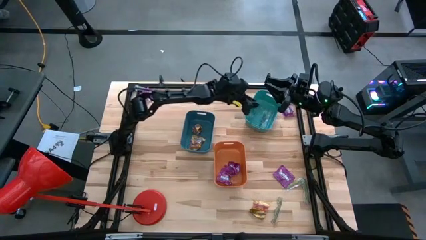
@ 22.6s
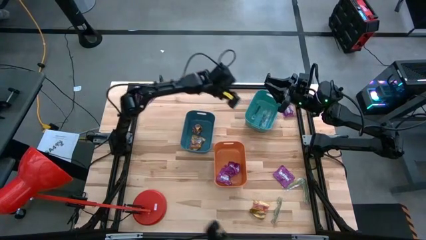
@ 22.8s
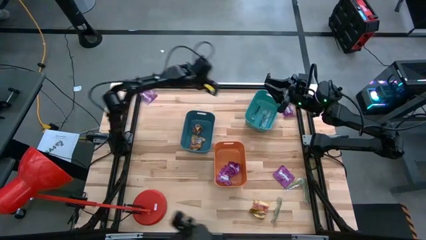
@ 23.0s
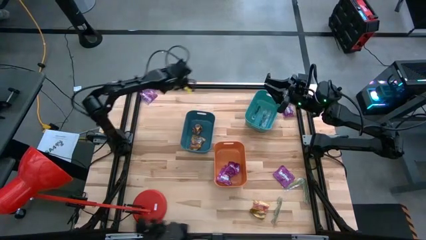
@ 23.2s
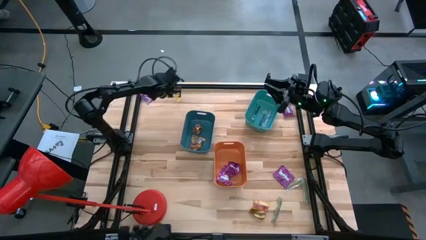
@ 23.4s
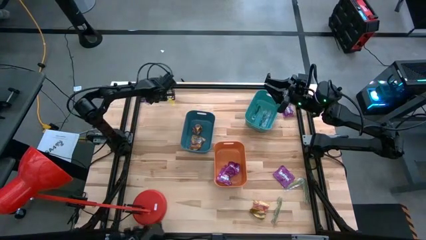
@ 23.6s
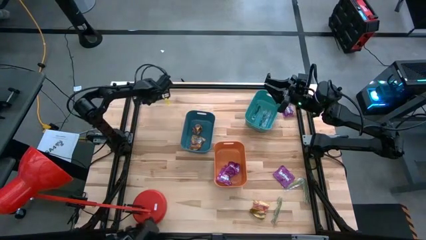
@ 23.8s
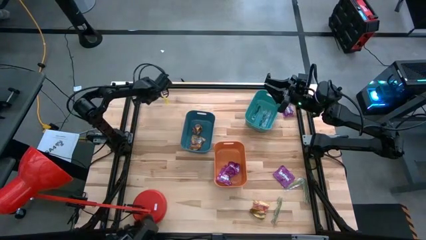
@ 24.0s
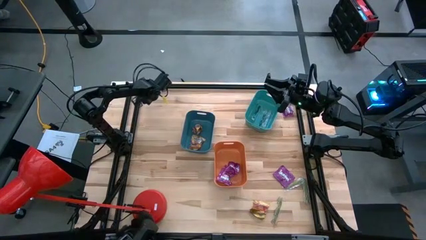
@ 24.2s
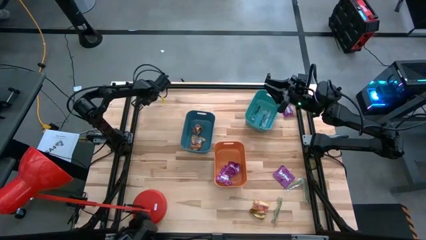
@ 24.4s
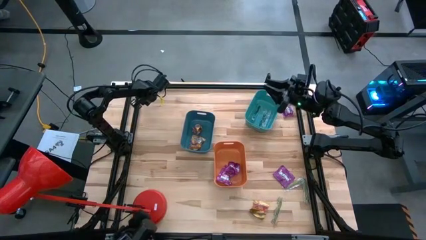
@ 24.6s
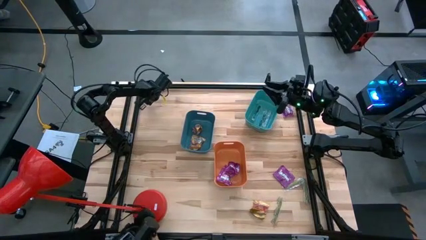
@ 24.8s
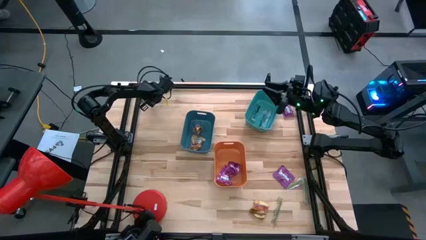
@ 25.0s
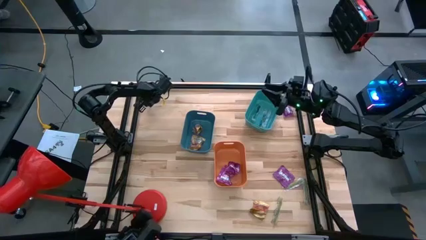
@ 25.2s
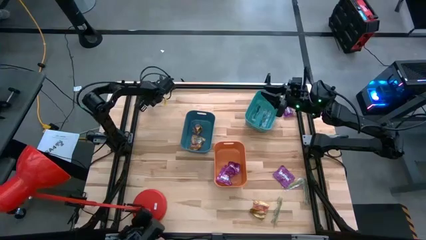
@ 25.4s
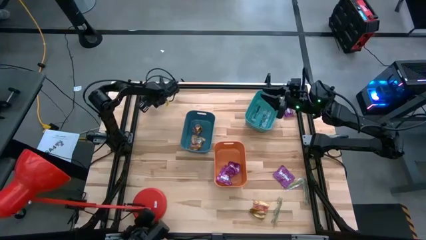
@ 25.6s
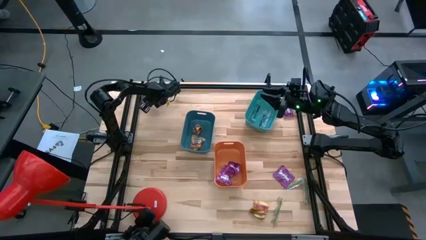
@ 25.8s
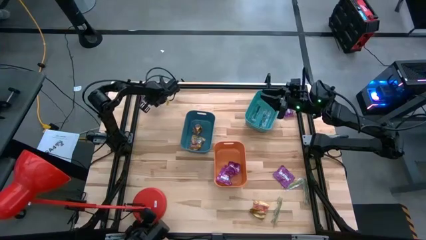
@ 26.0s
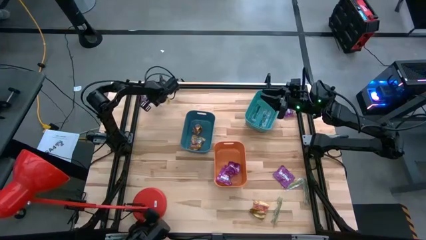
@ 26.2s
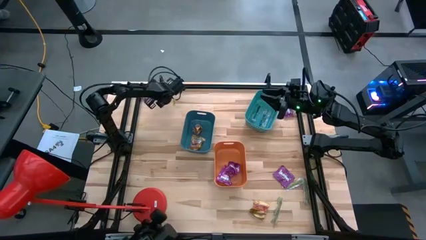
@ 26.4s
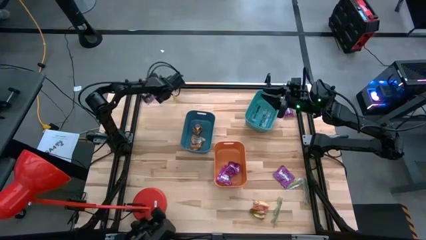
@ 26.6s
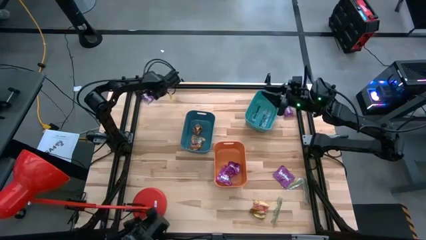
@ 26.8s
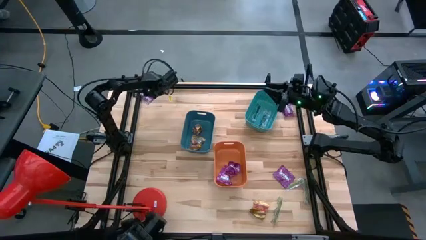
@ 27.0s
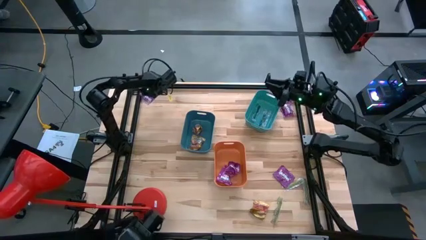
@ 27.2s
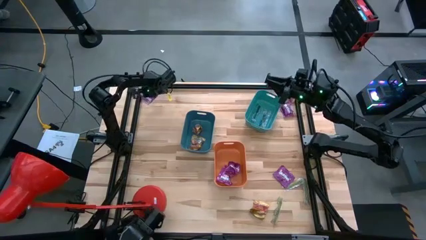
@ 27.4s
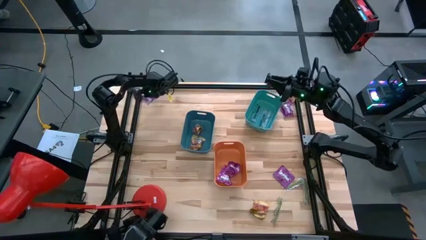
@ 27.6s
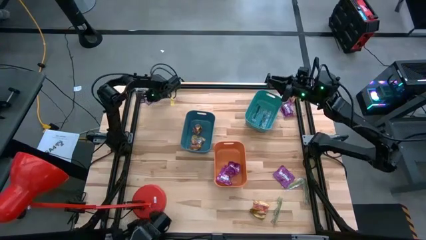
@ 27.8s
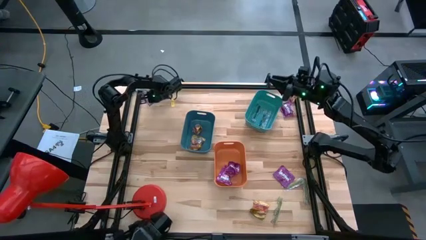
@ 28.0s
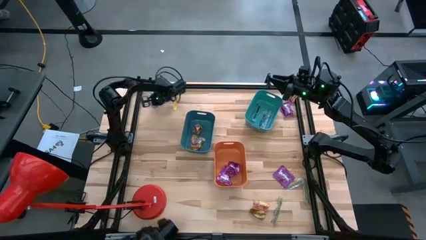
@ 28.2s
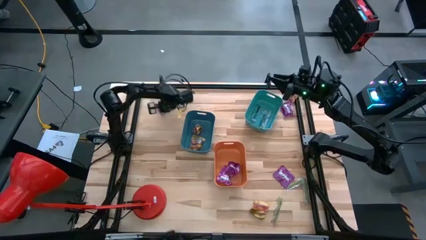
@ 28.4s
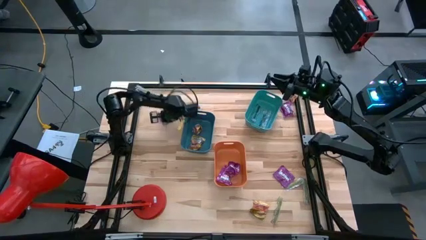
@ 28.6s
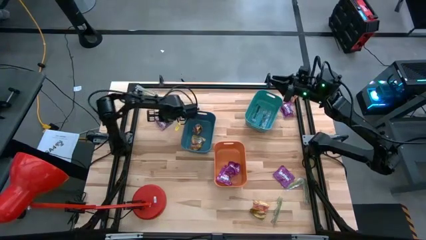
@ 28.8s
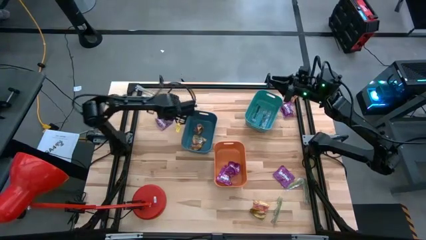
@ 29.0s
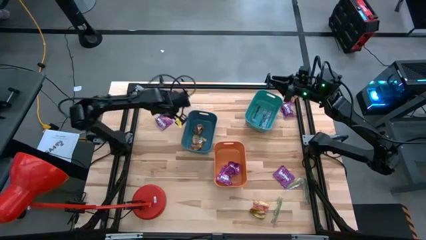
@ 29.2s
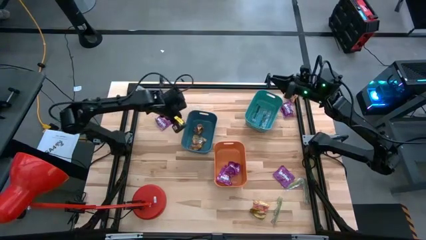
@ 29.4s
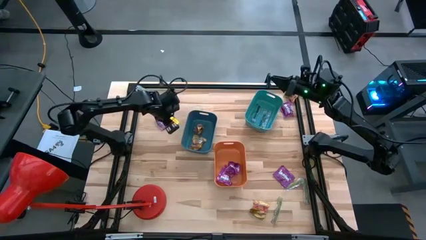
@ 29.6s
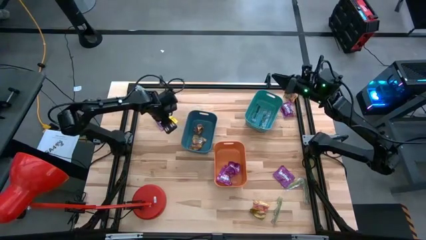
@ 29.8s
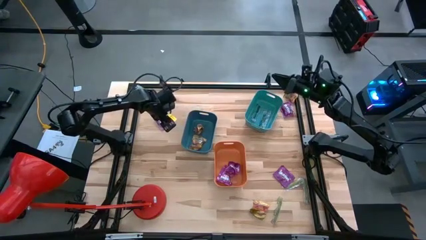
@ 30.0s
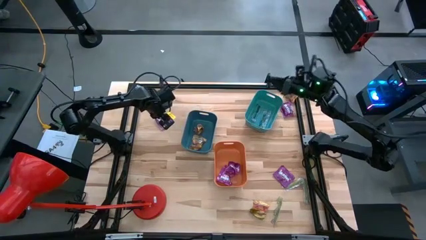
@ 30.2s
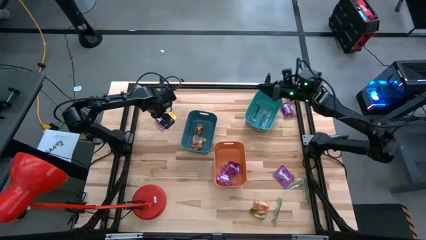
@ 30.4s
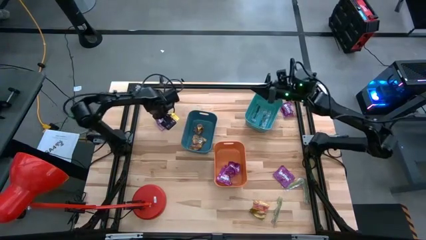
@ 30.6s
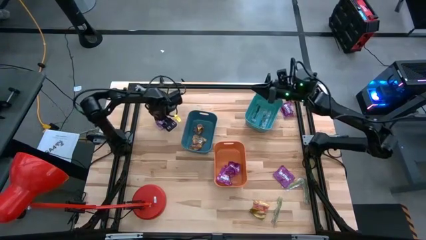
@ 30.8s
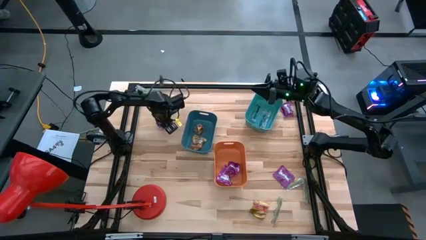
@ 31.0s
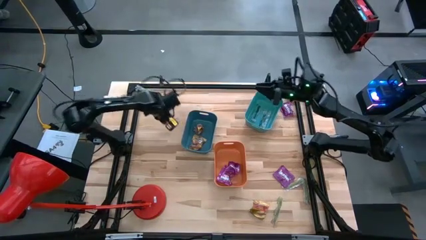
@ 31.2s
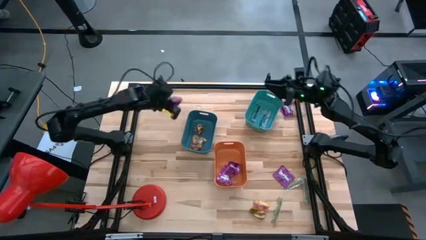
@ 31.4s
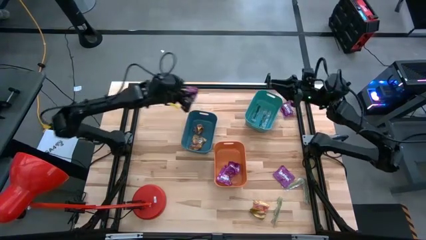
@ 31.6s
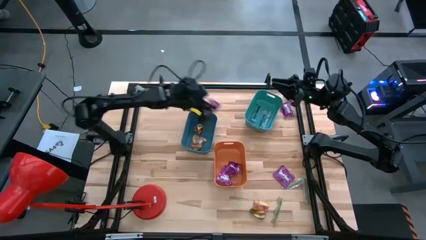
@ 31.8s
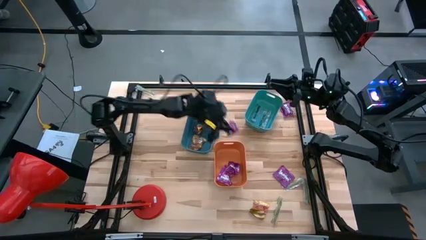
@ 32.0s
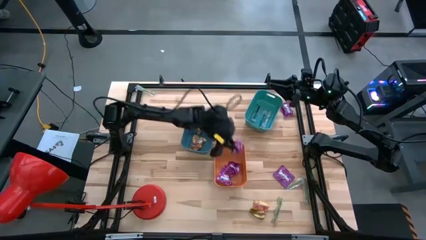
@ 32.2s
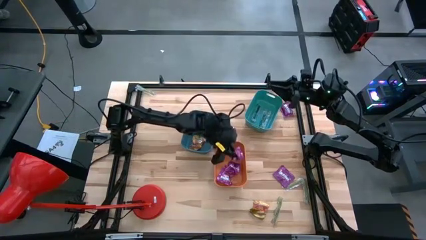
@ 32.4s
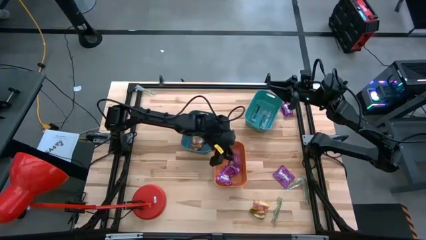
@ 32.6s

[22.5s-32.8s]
Task: Sort candy
Put the violet candy into the orange bin

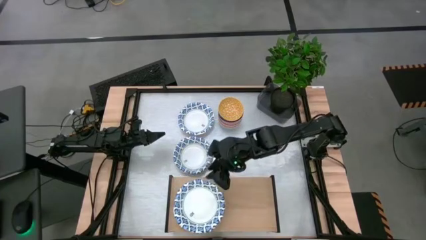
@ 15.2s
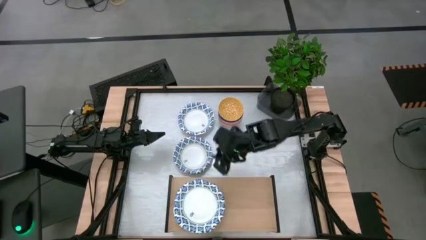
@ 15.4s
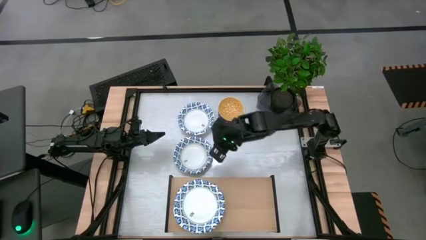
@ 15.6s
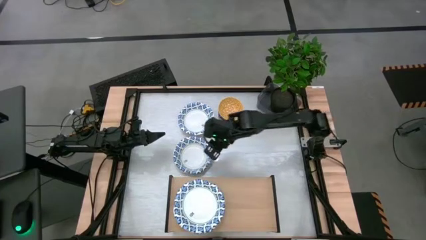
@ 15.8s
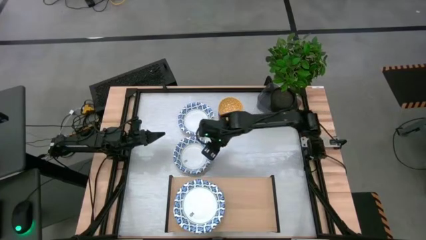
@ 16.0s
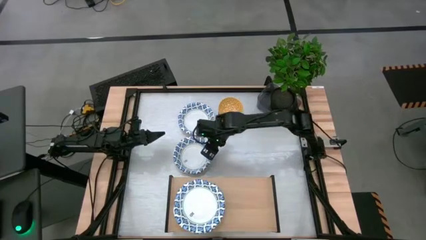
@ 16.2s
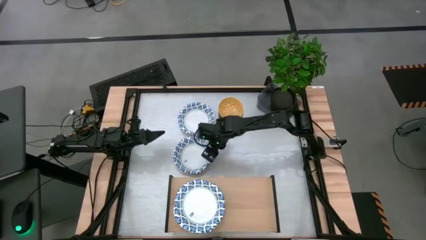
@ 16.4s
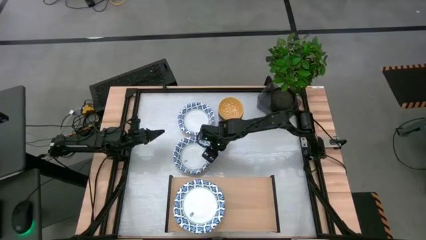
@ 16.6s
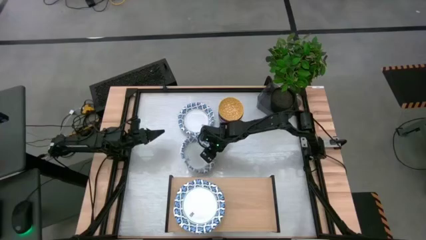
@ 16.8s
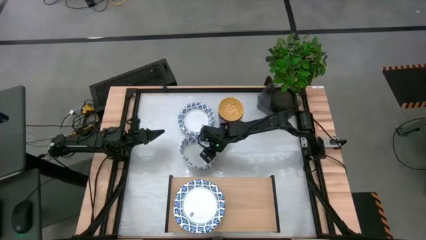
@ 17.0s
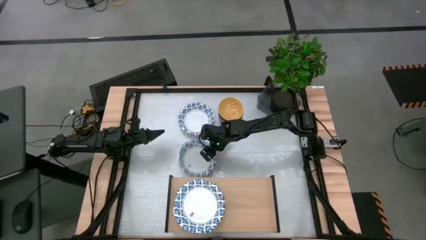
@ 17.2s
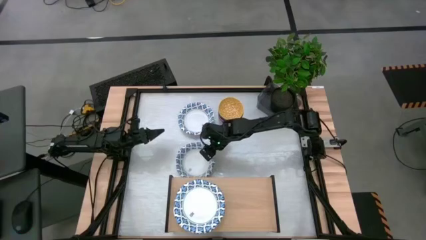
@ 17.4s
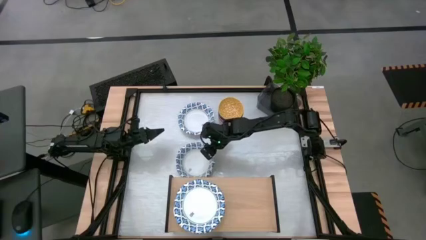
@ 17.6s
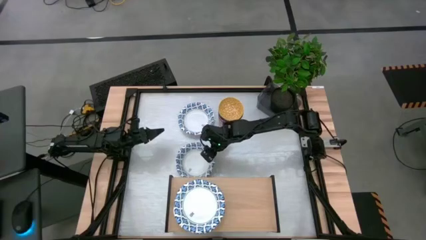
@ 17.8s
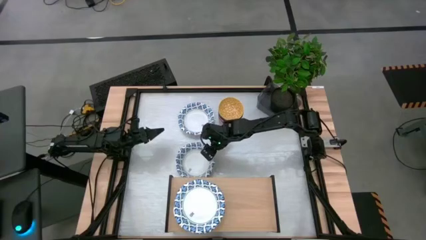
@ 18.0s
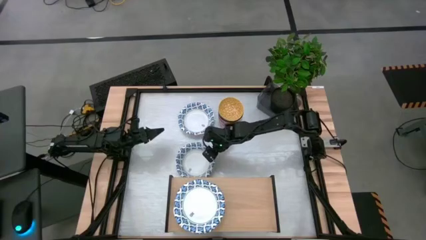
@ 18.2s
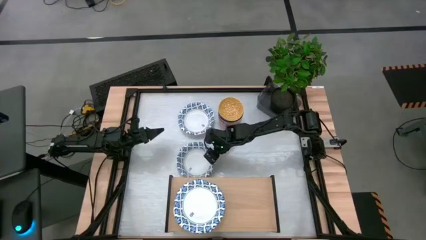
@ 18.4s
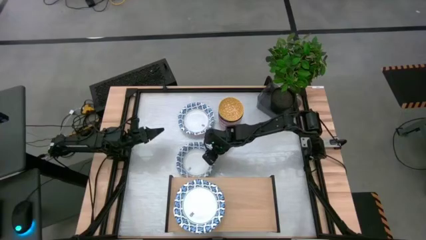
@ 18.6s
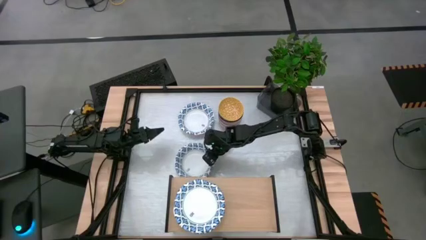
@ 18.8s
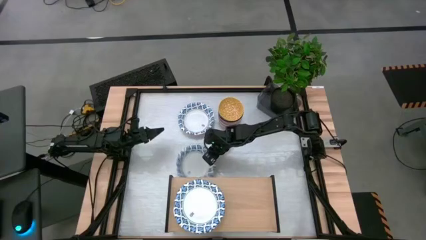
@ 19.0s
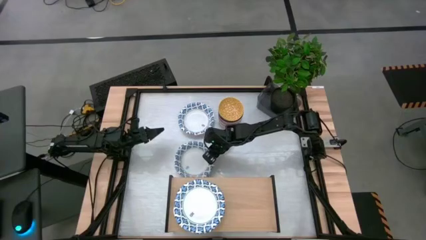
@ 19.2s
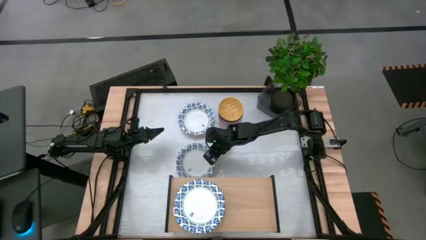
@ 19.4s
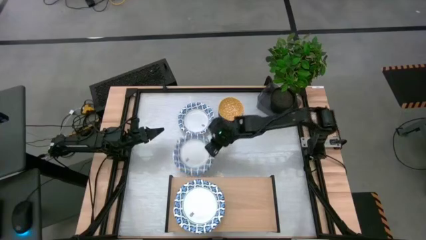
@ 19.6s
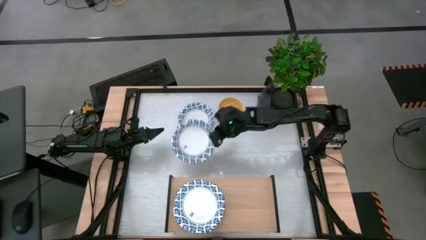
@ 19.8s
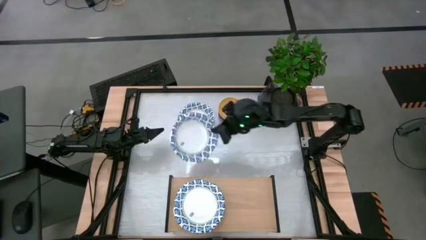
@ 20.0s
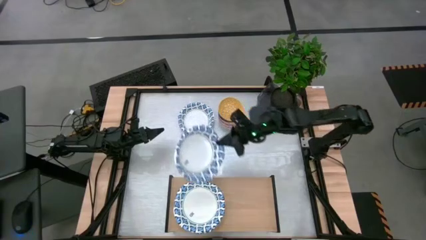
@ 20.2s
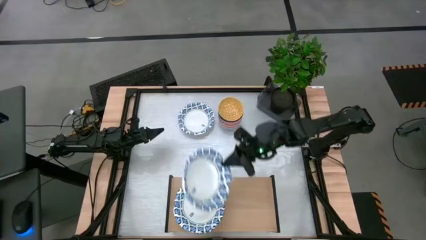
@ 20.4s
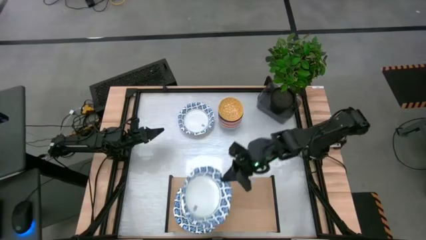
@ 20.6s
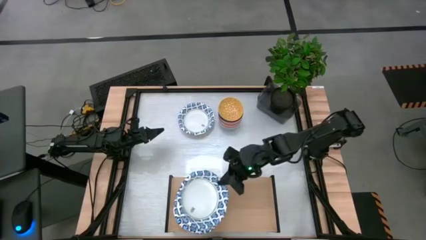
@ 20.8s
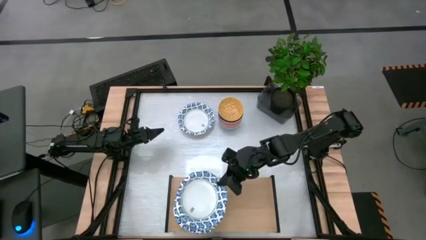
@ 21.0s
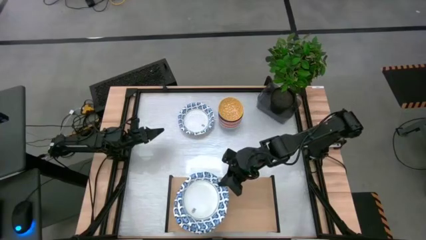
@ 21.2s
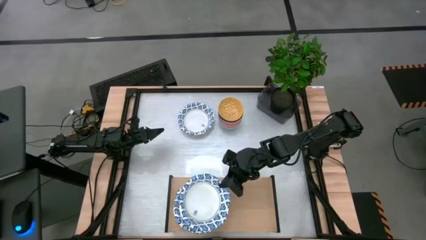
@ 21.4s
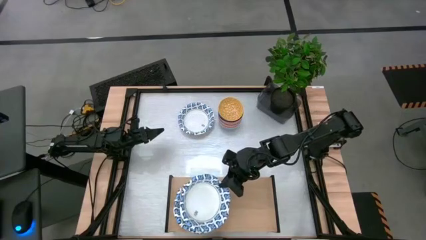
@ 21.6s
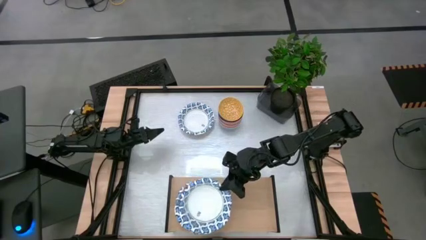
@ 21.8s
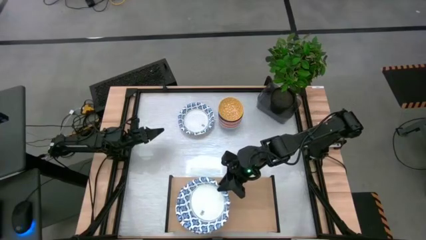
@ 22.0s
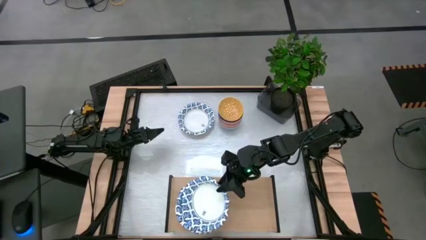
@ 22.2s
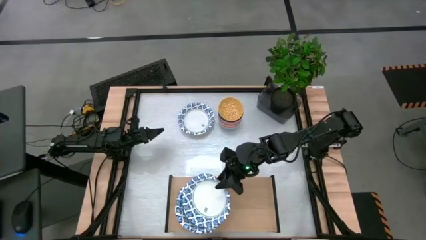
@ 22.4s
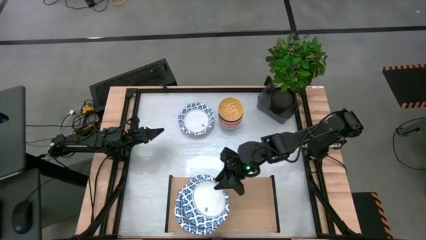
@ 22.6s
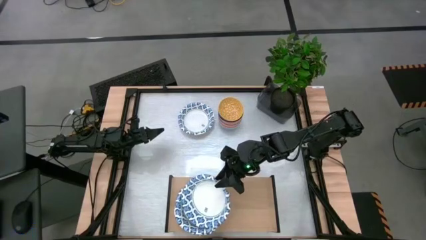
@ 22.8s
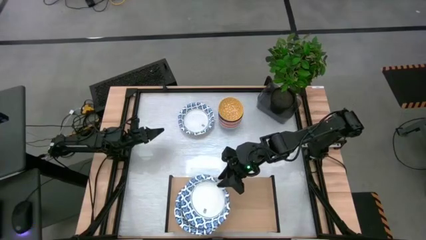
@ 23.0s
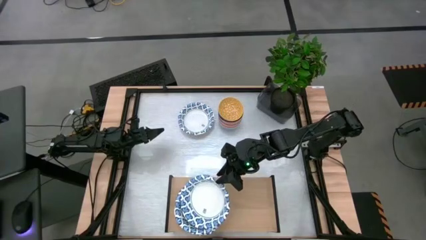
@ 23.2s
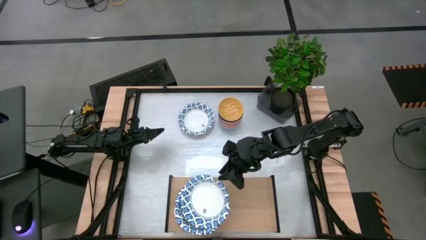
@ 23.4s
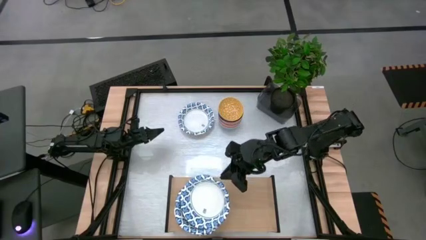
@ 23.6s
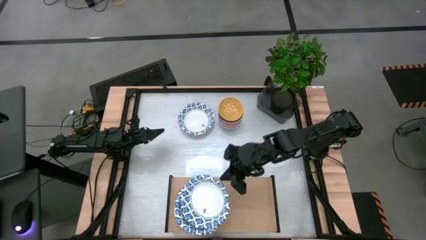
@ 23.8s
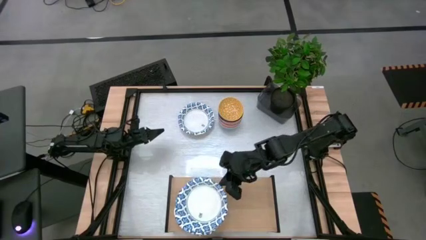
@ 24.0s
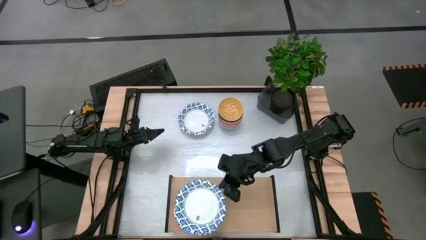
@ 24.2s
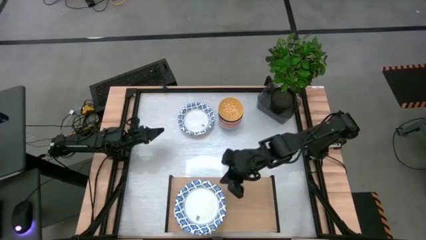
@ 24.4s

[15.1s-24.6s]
Task: Place and stack plates onto a shelf
Stack the bottom white plate on top of the white plates on the shelf
